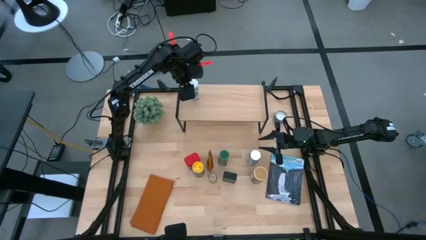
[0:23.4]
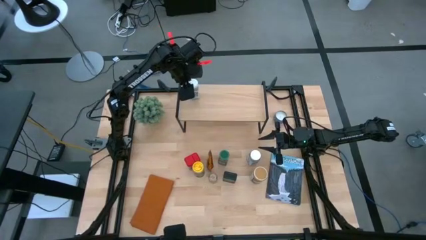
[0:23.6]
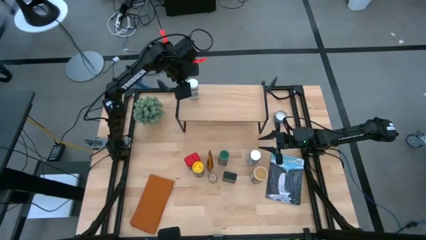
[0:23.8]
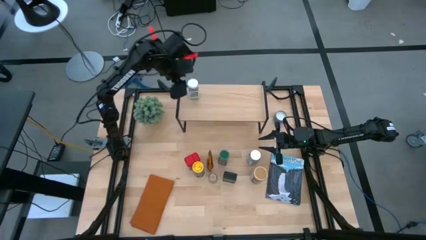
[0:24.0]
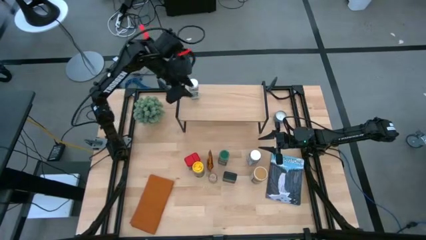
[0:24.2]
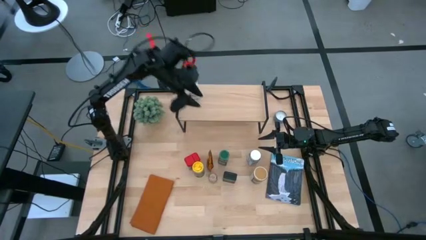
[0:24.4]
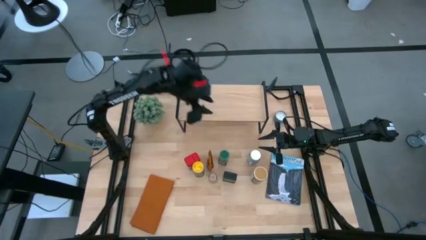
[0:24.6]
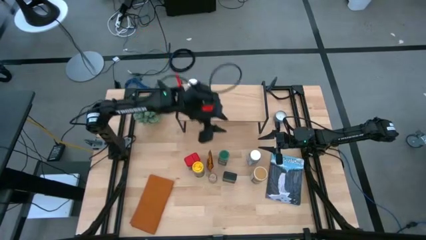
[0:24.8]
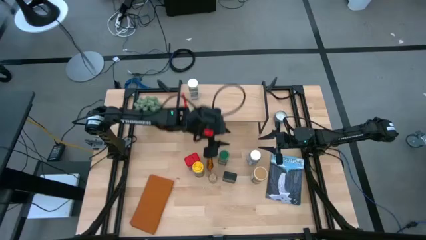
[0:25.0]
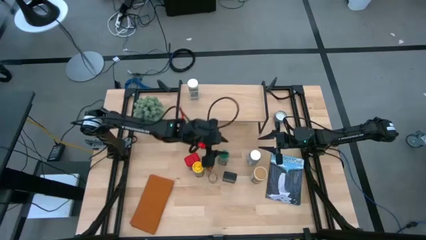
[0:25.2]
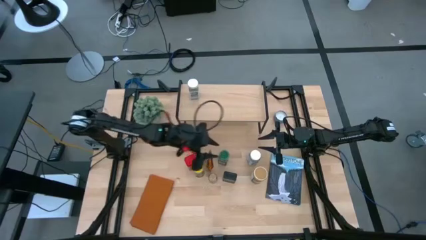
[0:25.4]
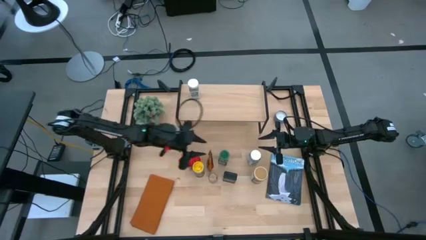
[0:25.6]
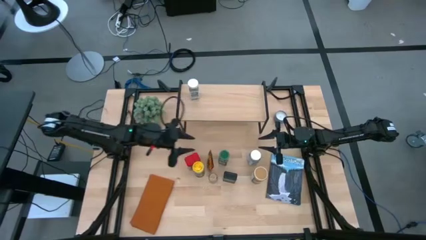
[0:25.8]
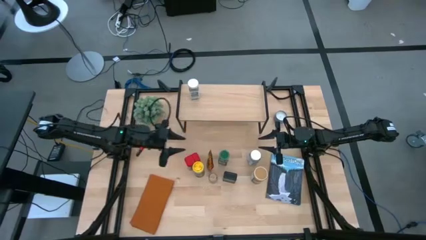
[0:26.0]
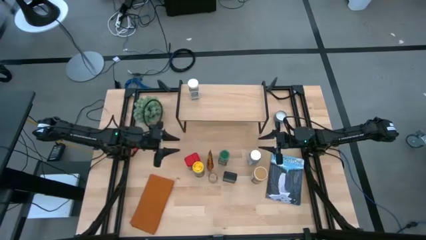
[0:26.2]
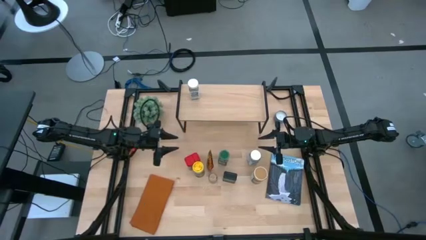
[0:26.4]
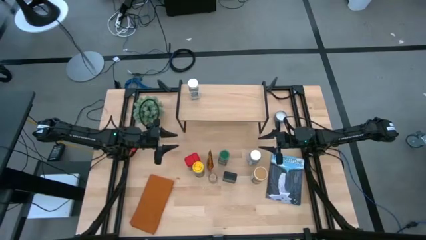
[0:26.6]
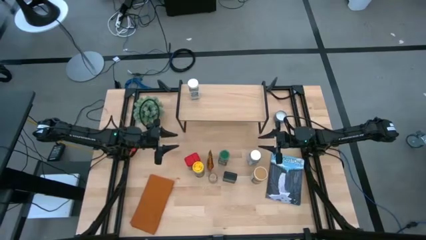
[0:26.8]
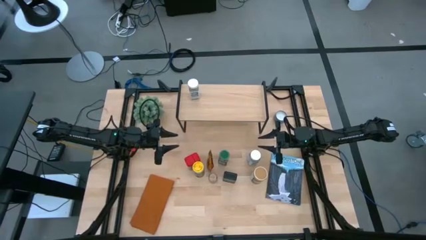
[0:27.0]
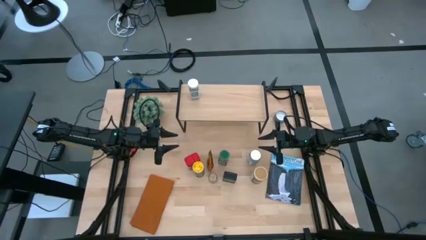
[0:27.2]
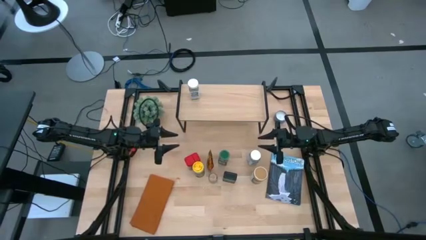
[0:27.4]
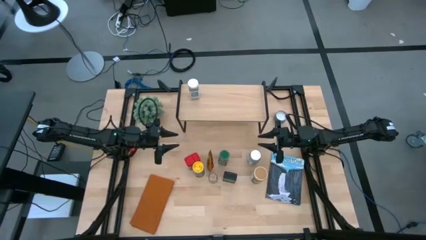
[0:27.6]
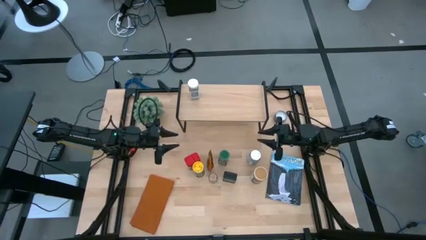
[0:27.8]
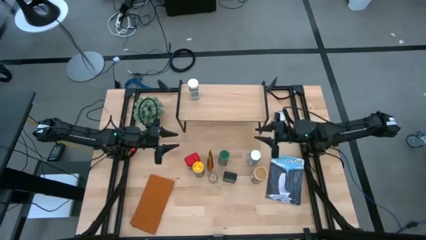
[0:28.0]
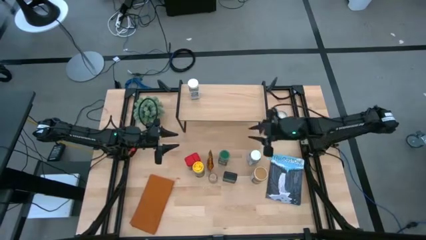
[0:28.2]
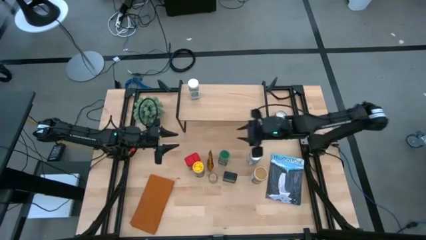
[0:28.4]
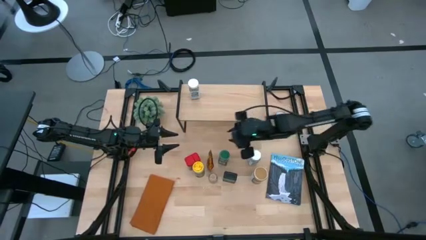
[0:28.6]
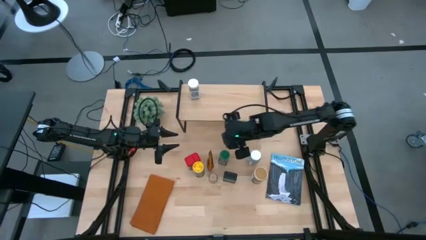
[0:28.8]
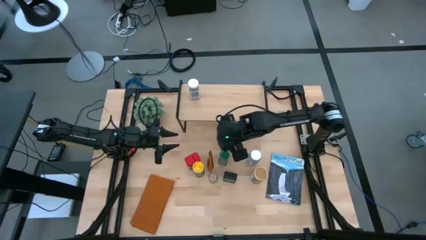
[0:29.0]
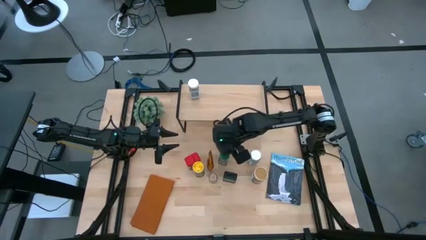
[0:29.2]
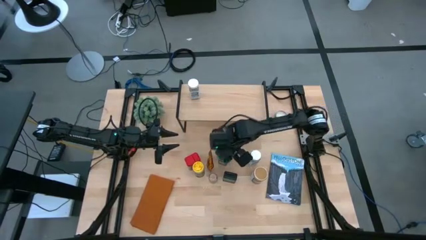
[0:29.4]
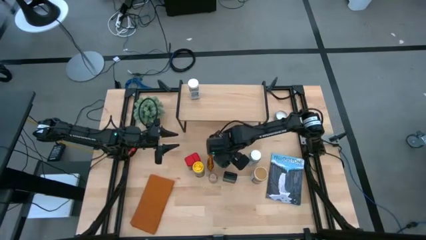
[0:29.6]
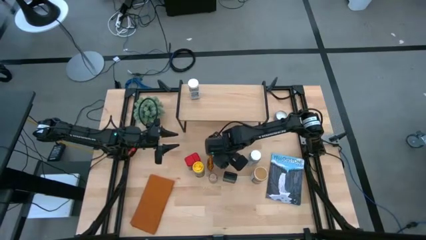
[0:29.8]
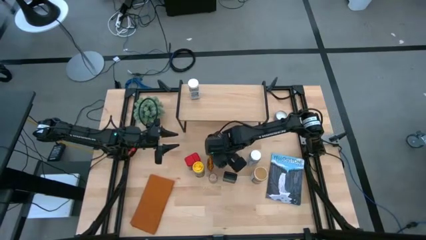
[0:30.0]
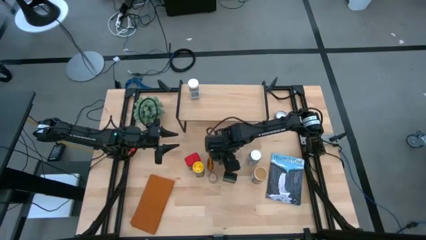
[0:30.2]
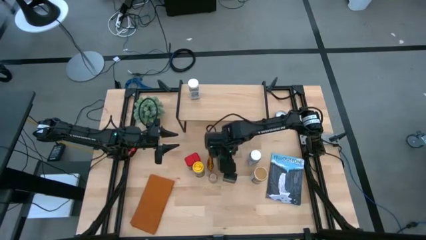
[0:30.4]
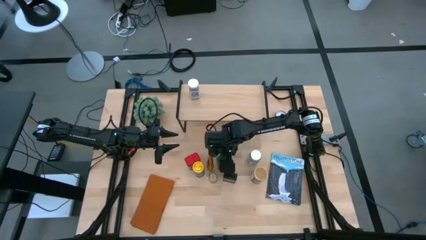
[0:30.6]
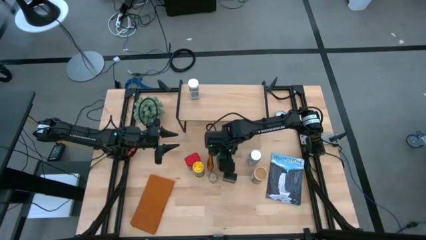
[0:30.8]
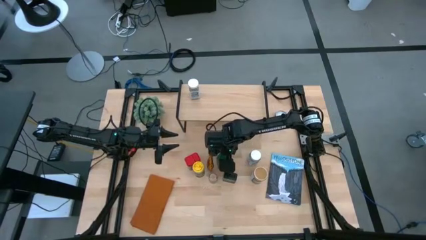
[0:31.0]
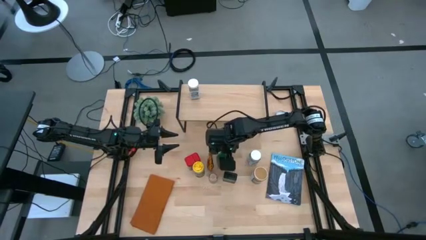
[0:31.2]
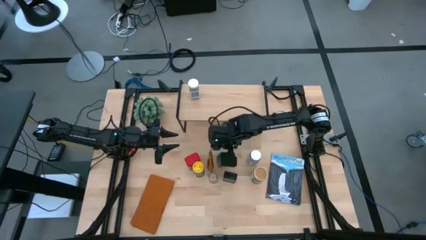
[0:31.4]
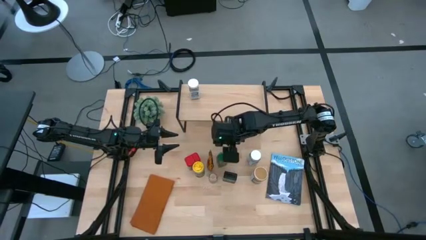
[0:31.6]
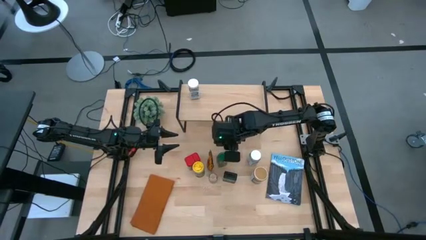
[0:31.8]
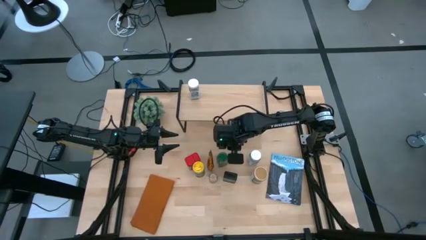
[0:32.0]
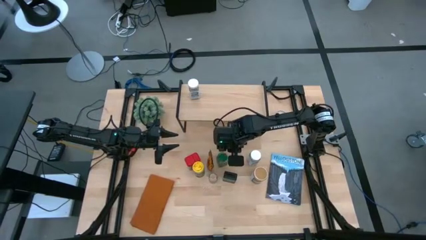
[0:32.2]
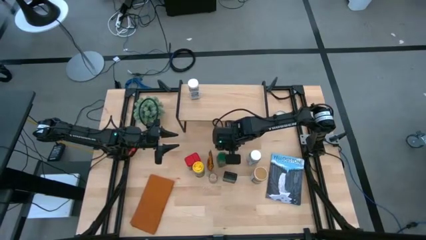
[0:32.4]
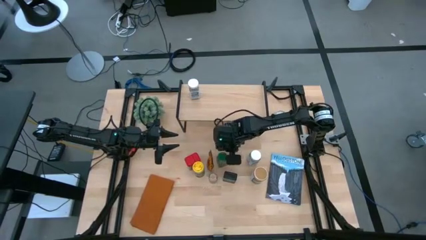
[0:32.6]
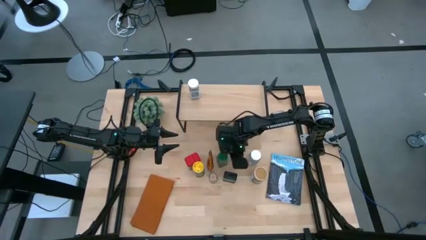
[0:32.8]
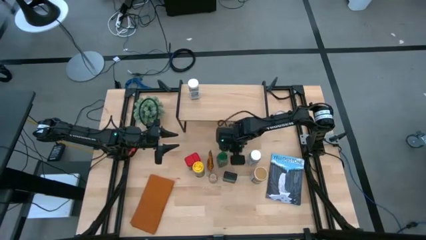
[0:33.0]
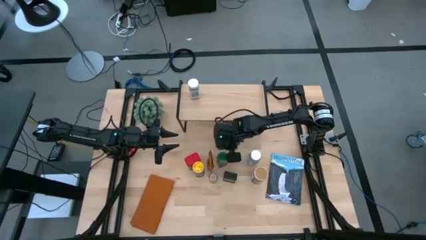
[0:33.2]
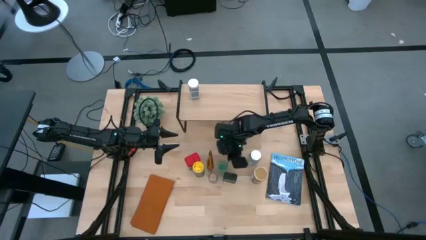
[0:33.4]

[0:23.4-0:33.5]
Task: Shelf spices
Put the green seasoning bottle on the shelf
